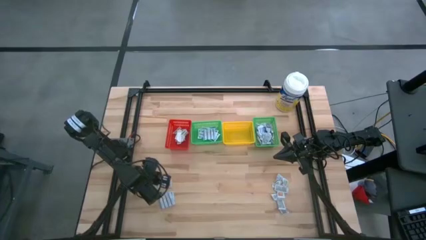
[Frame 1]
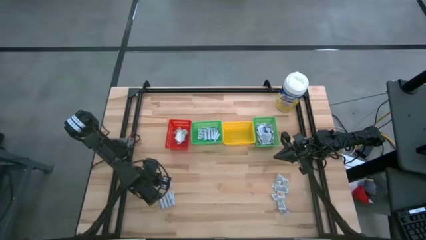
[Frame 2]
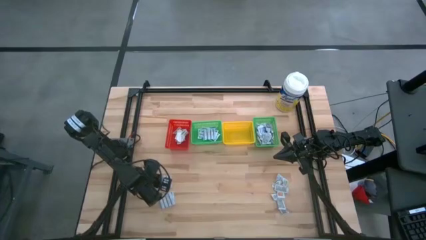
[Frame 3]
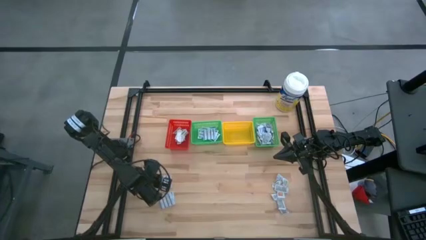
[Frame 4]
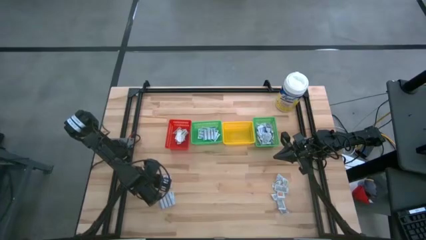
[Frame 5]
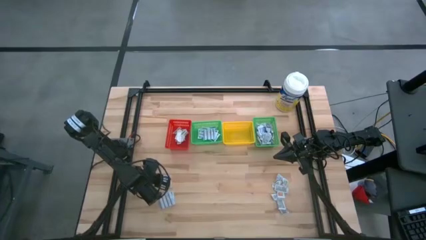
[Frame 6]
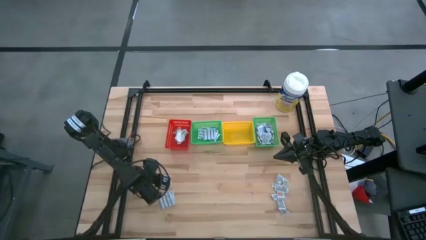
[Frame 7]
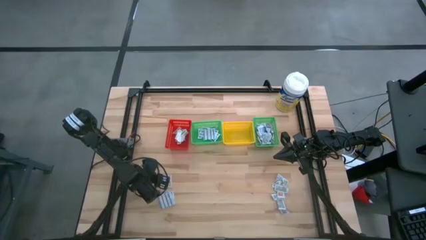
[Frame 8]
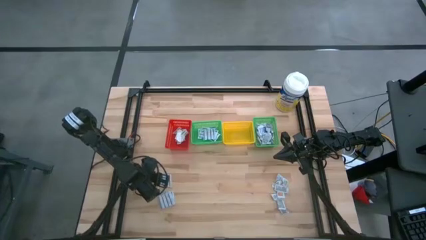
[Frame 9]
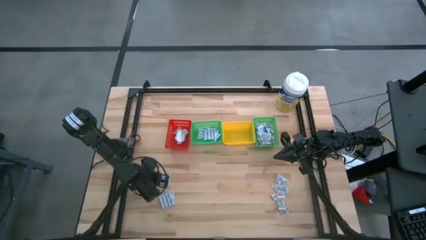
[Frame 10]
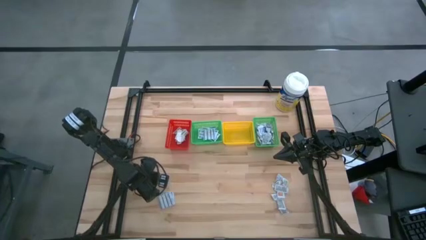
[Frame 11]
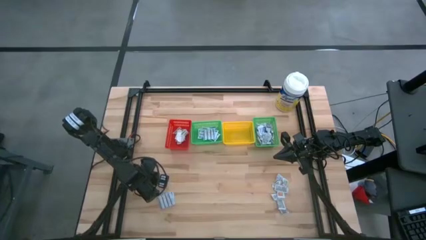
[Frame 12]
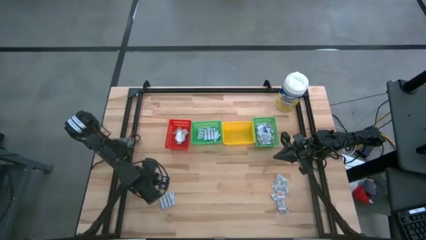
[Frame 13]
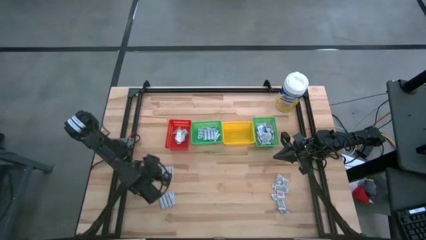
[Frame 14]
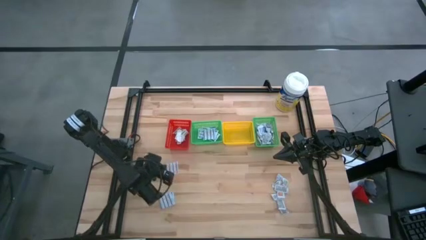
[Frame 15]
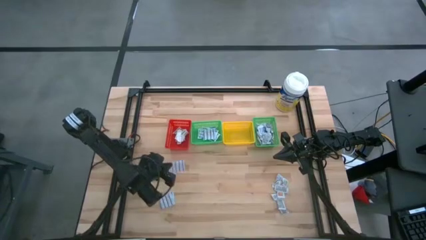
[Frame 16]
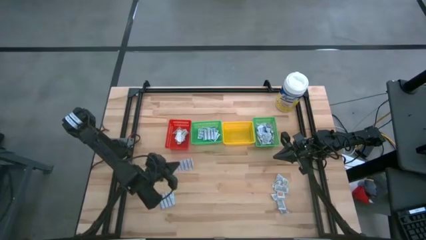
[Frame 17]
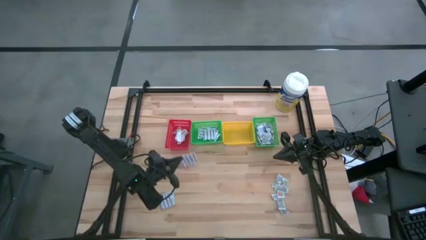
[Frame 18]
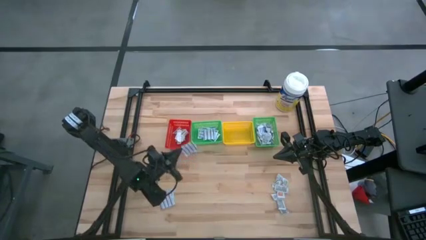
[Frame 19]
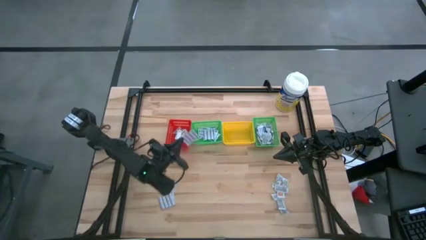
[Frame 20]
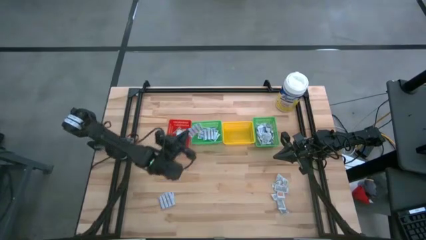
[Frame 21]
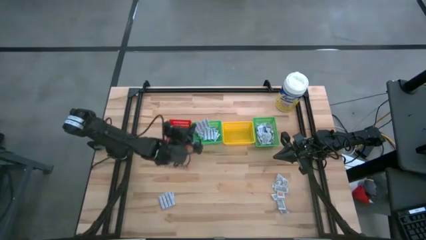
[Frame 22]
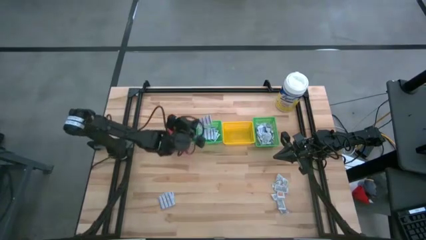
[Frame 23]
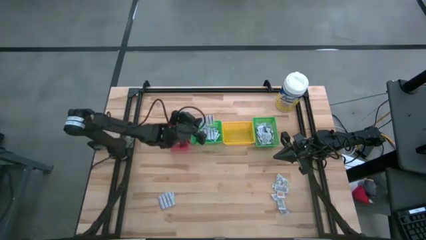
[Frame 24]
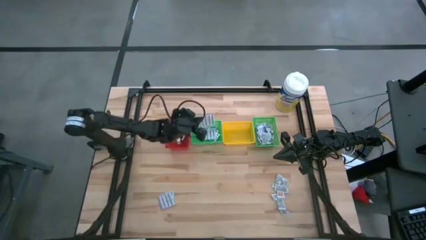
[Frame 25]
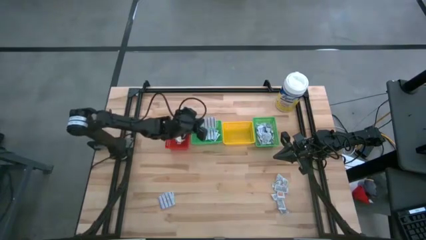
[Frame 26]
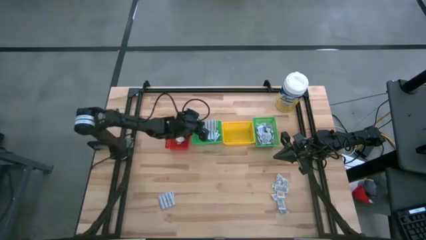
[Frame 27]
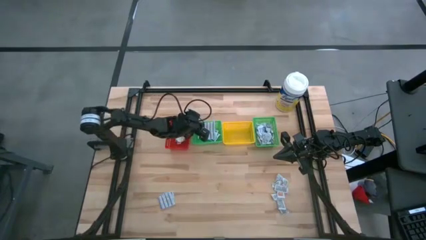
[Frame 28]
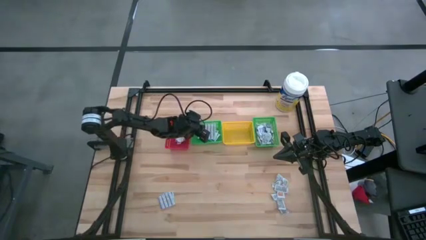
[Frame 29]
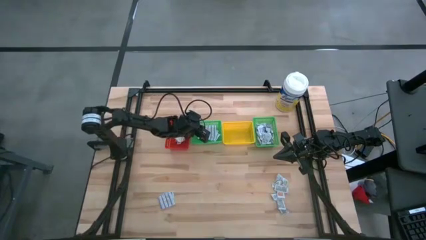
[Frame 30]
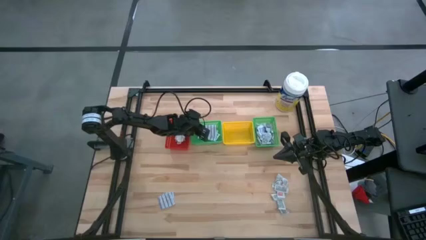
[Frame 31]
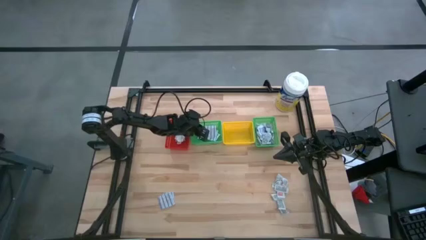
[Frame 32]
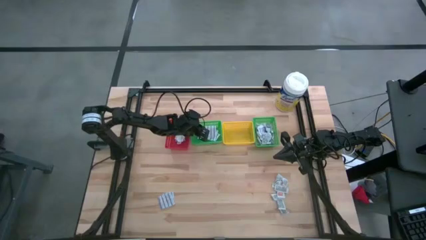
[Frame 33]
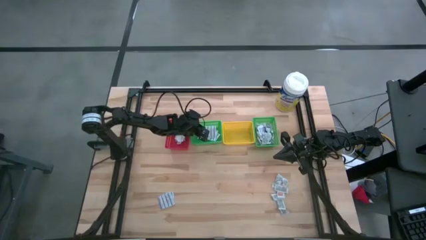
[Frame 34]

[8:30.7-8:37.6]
Task: Pick & Place First Aid Supplies
Put the blue bandage into the left green bin

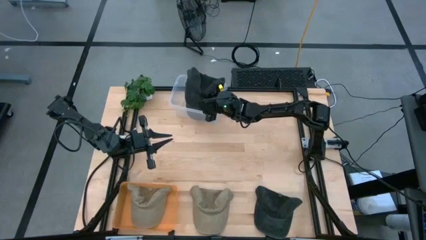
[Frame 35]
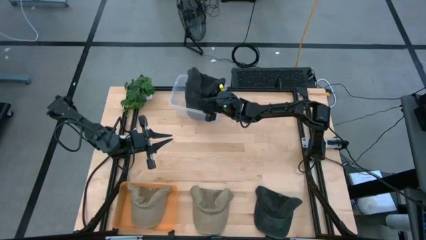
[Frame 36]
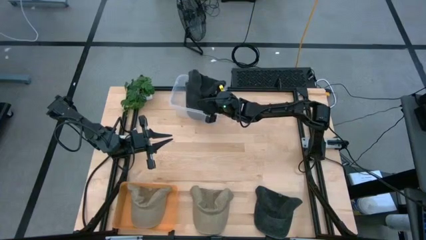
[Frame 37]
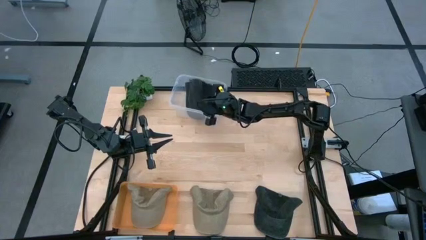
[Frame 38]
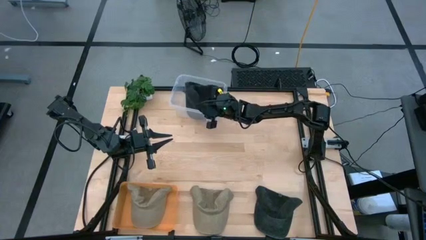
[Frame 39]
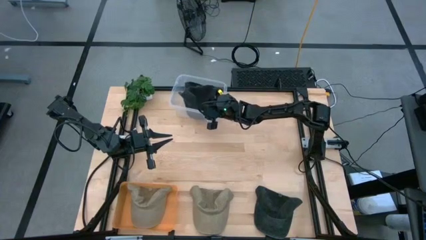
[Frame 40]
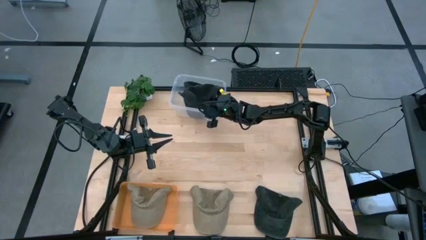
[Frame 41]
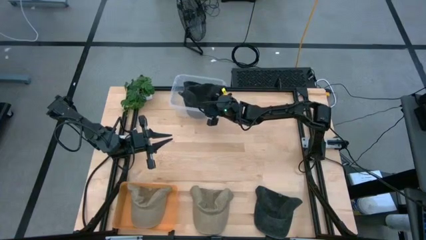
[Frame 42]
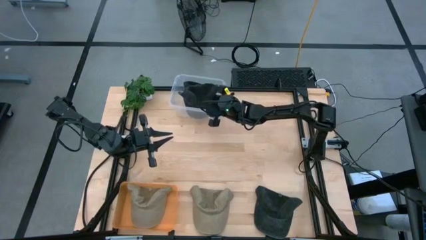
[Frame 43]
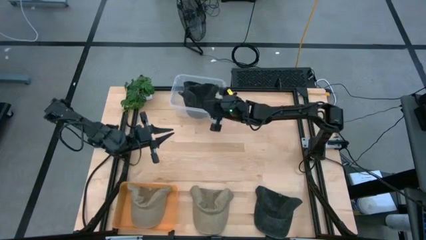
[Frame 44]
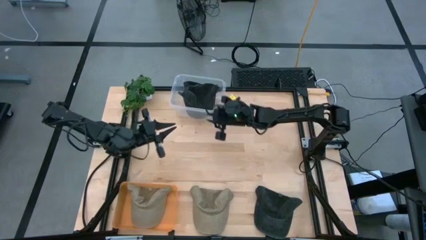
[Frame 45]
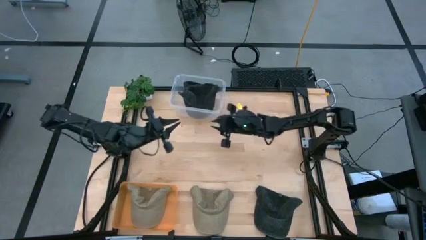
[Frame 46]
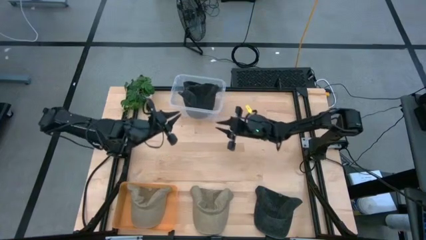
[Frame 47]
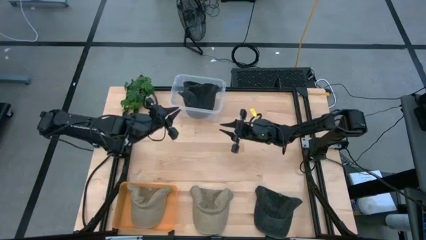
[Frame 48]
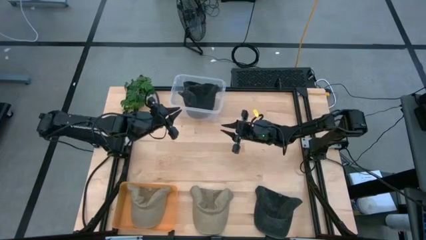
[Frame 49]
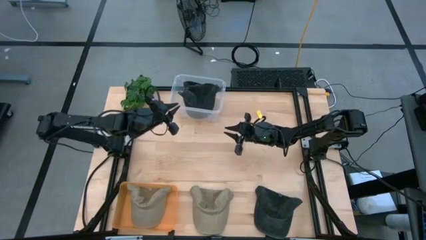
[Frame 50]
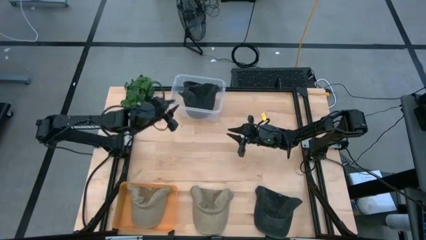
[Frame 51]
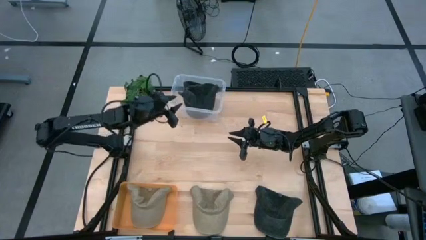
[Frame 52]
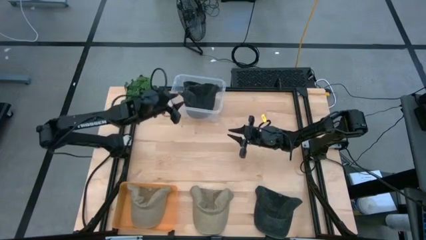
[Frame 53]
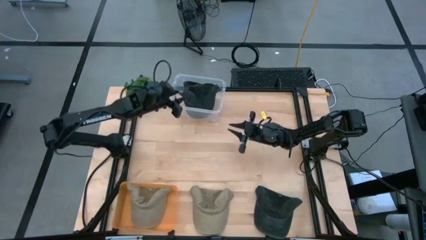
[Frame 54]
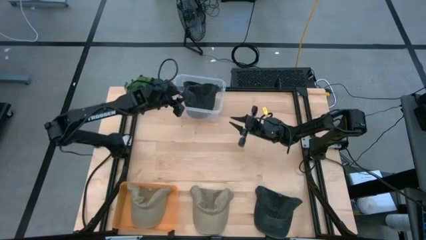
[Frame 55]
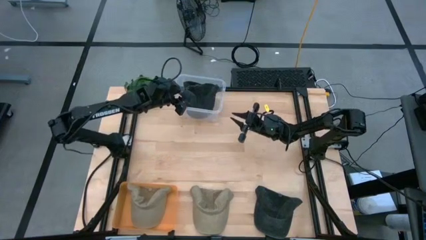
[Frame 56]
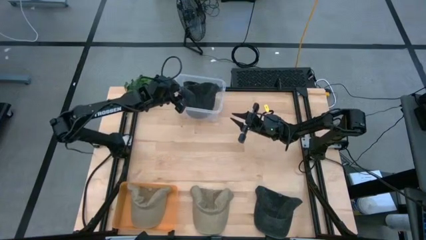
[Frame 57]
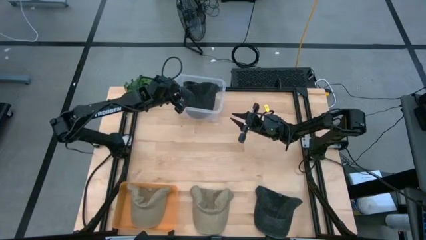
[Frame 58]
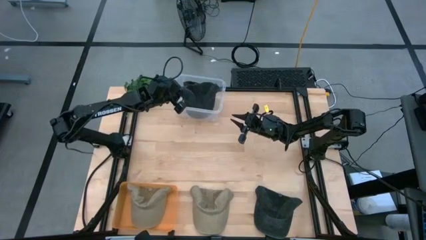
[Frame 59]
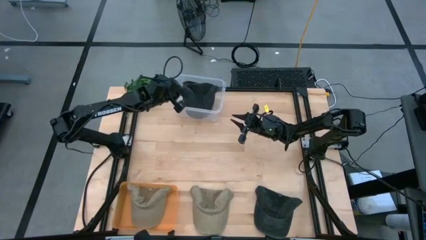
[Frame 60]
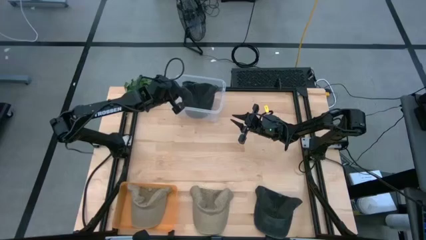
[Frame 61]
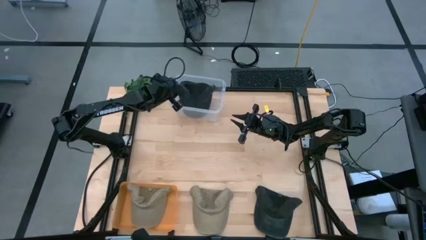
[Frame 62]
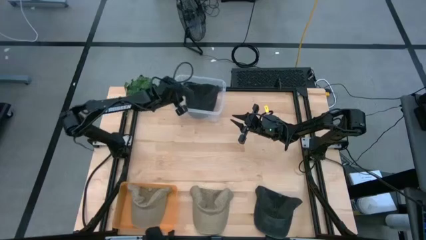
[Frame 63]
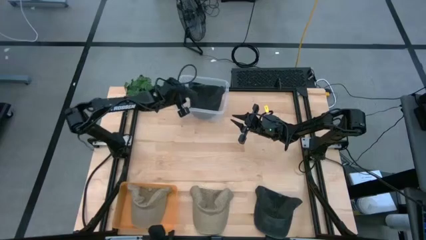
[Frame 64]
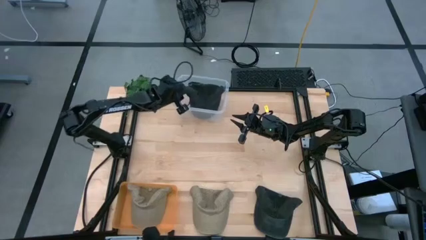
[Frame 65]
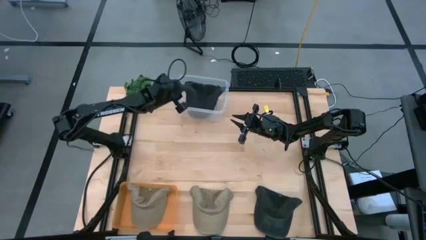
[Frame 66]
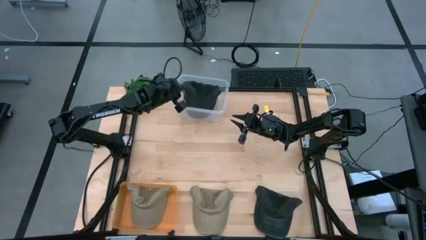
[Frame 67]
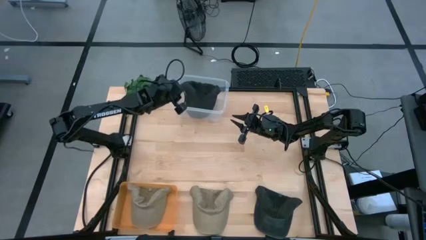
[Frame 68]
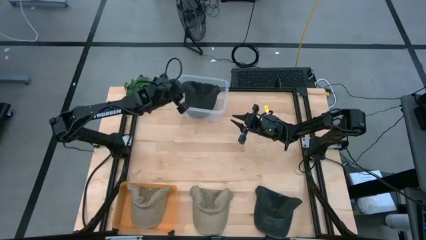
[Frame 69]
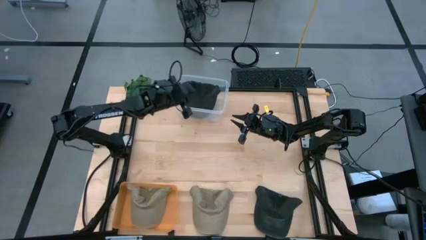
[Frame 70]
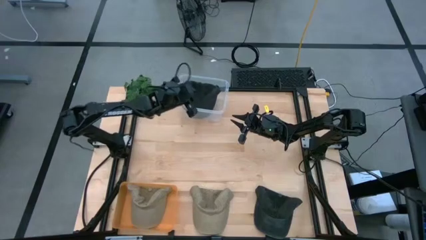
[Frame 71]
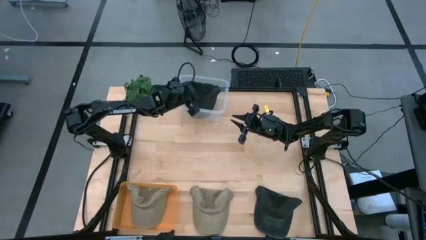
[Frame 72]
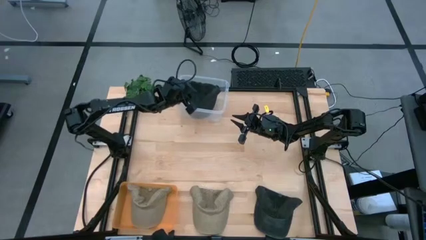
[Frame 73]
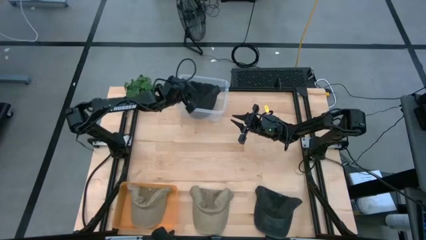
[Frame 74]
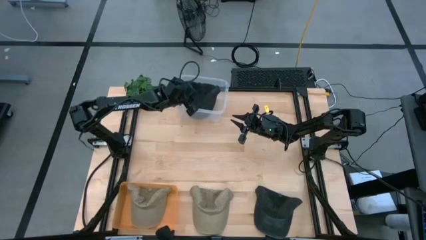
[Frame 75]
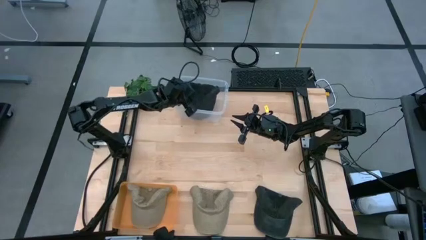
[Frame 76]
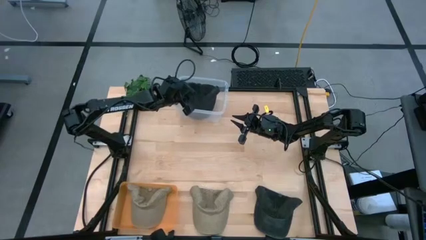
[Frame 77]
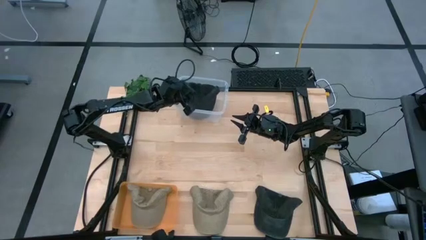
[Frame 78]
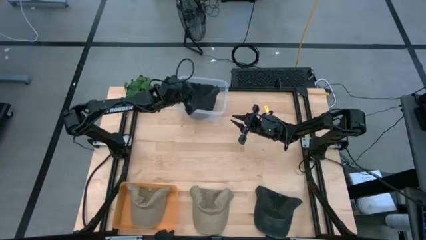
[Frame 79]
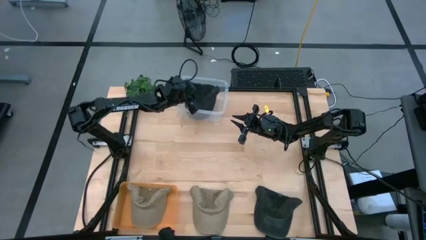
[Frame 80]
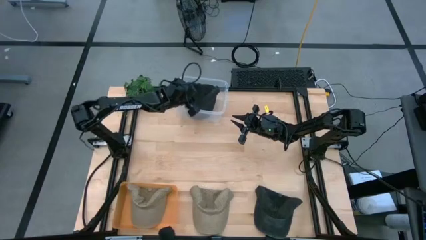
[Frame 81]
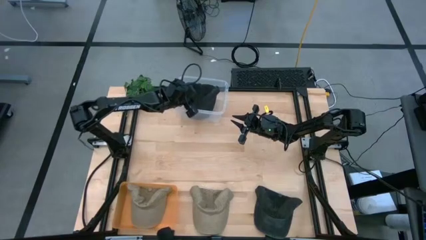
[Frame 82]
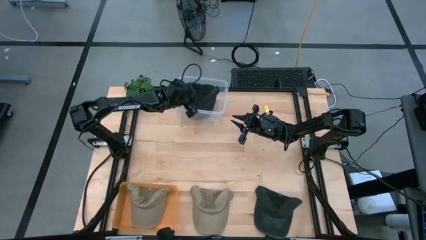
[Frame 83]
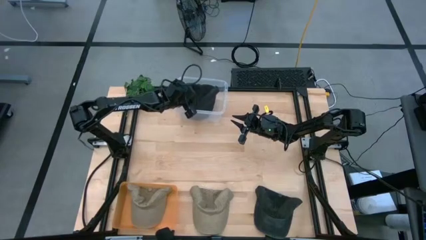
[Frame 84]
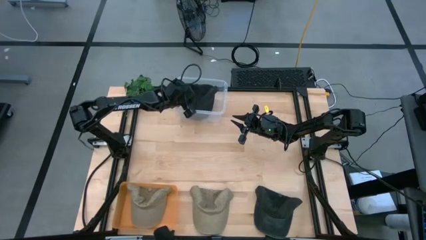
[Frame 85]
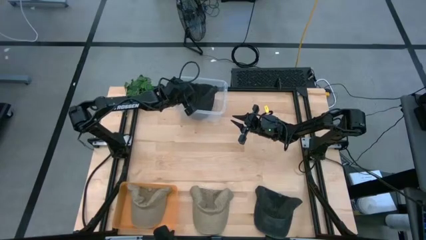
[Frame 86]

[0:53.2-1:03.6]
Task: Pick & Place hat
Put the top black cap into the transparent bin
